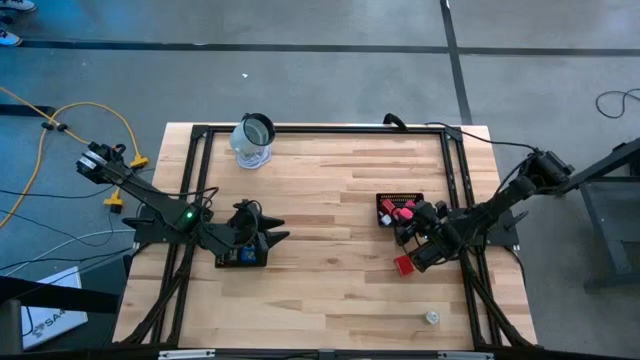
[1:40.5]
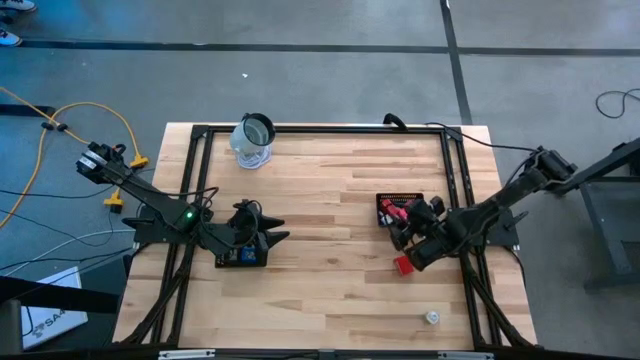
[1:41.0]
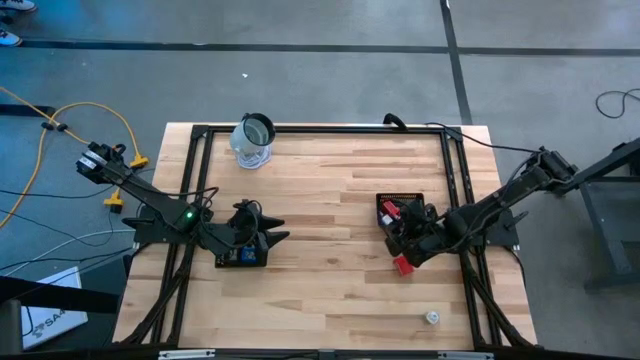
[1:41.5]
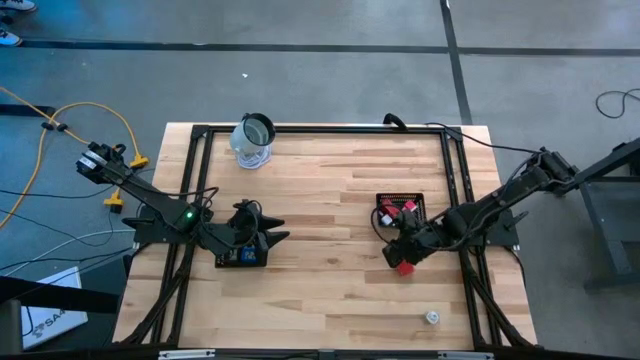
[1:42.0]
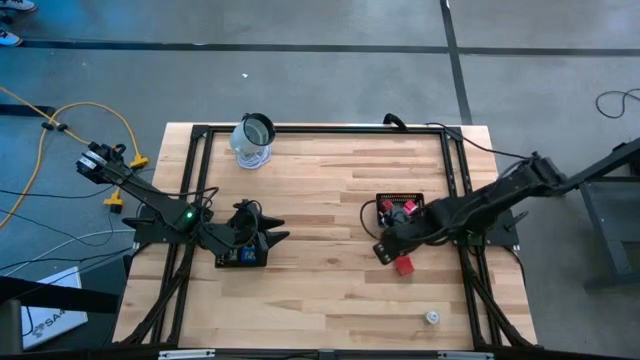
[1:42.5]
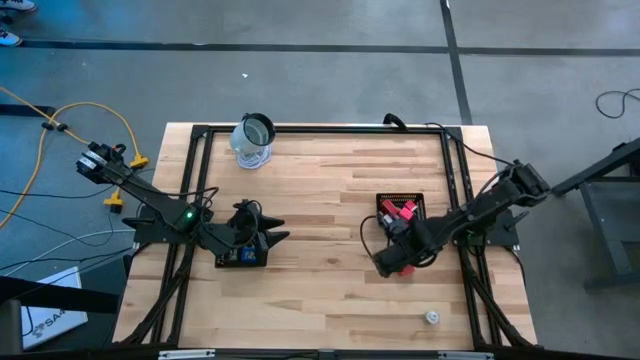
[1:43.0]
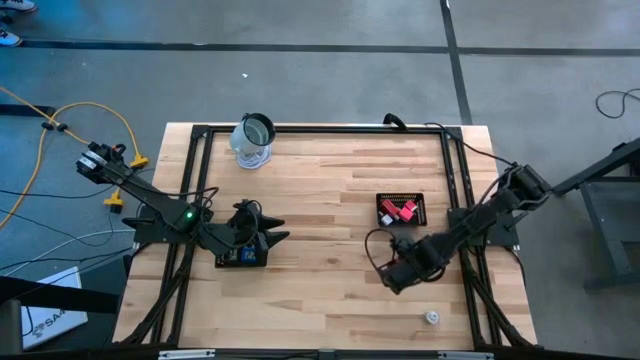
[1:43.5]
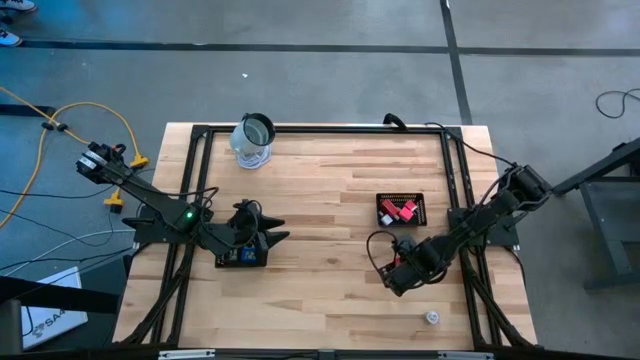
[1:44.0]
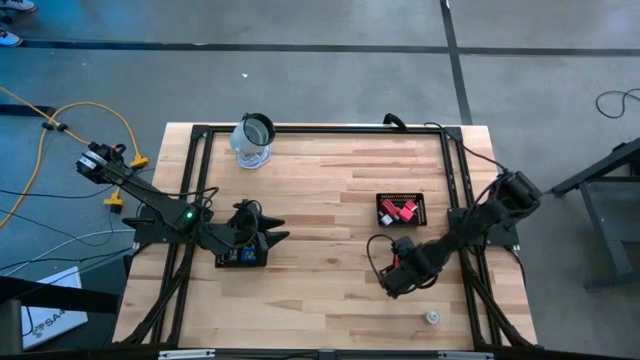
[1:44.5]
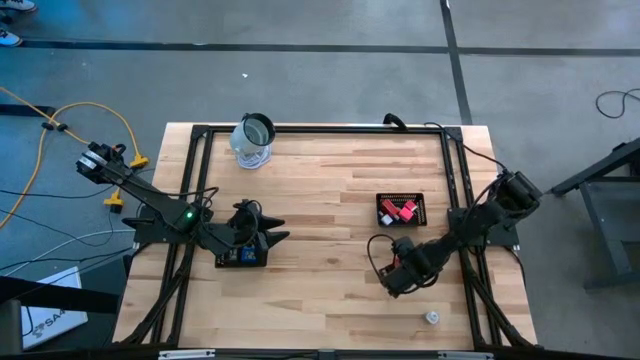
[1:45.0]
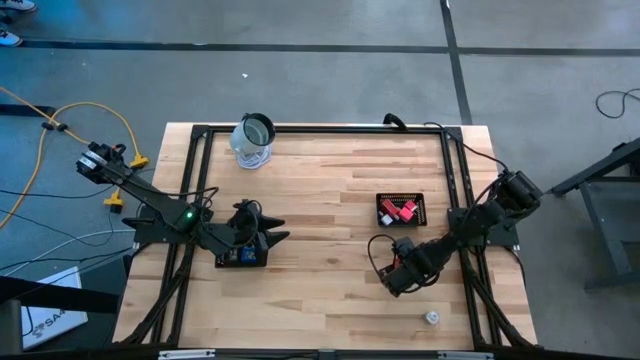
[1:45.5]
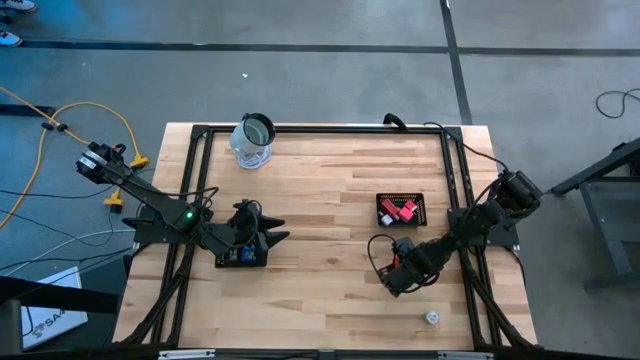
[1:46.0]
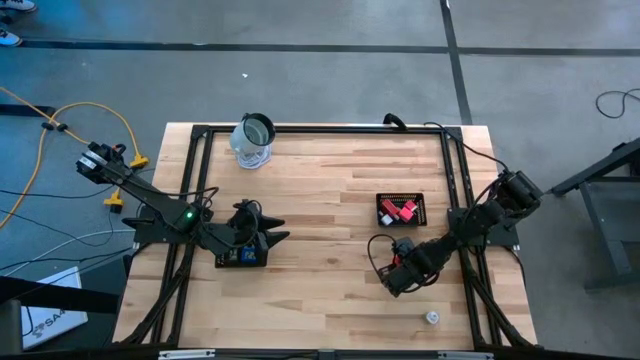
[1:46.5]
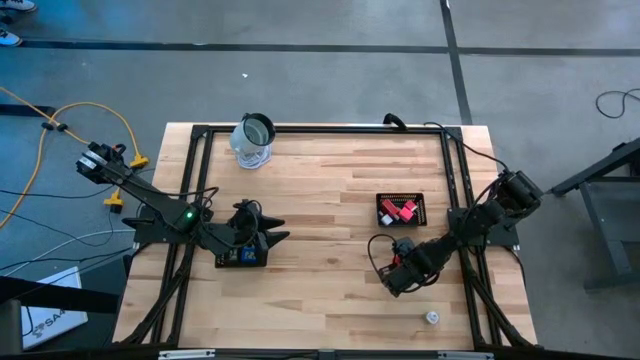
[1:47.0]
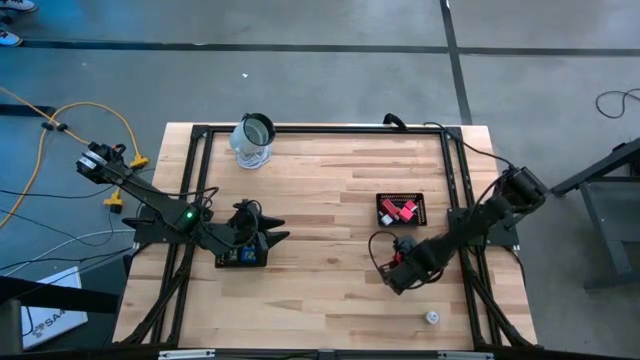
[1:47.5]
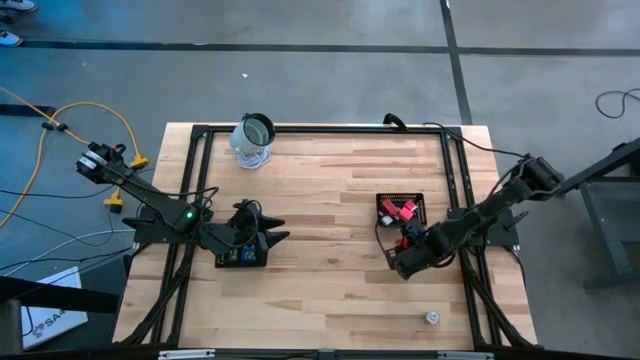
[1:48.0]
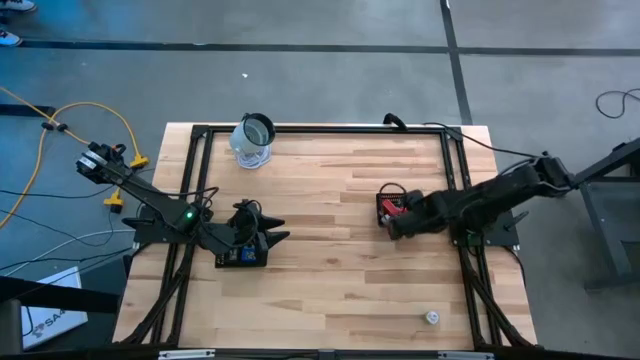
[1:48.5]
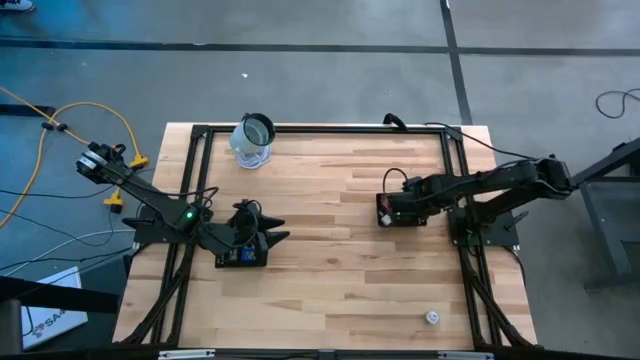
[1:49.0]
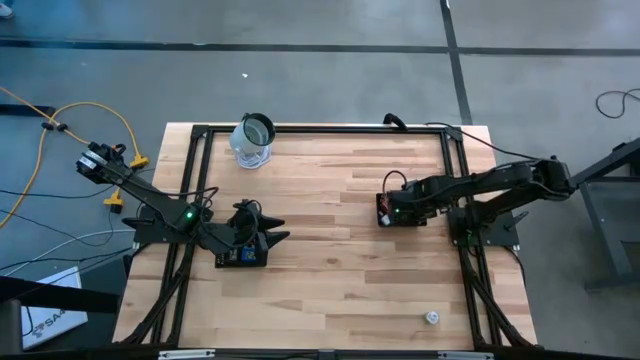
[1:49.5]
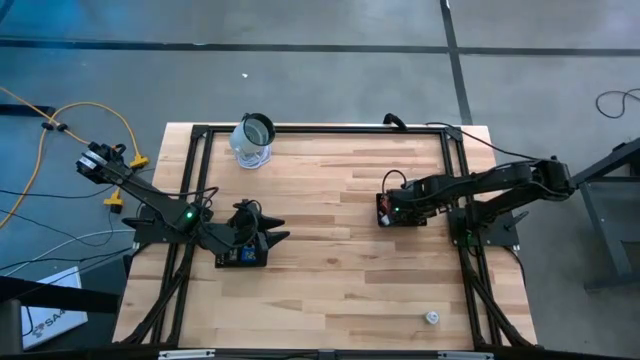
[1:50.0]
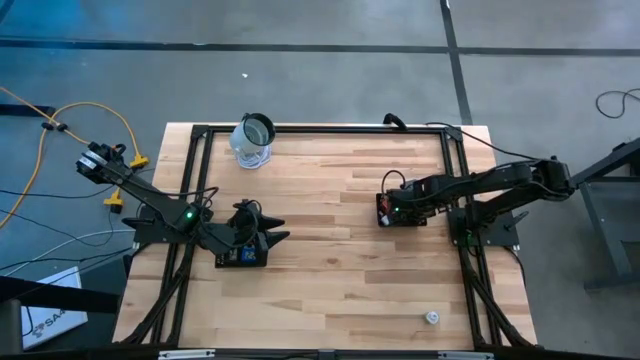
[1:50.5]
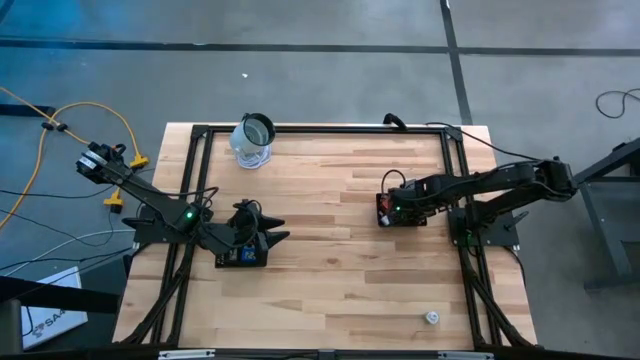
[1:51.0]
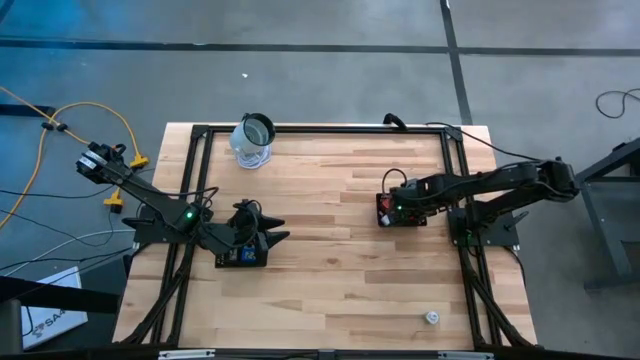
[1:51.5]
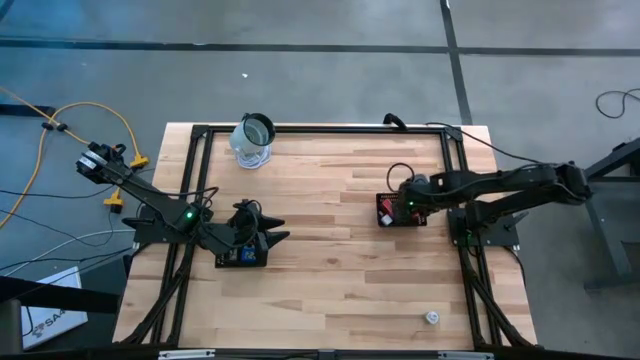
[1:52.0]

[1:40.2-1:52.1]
Task: Pick & Place Office items
Put the red charger adapter into the right black bin

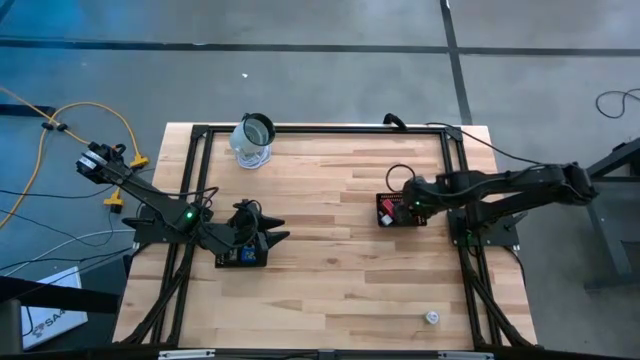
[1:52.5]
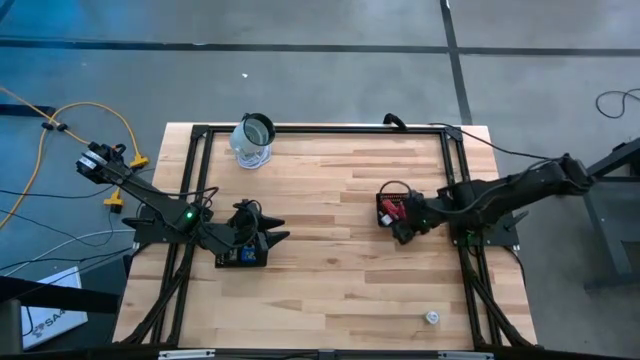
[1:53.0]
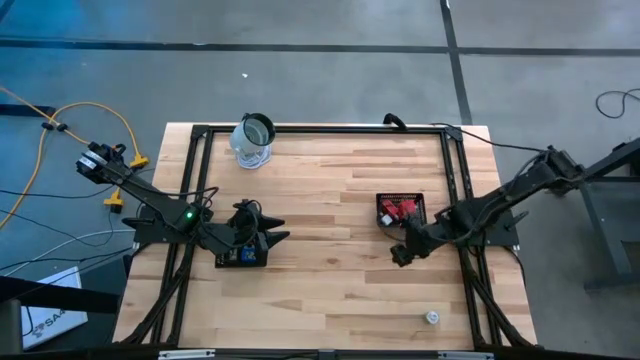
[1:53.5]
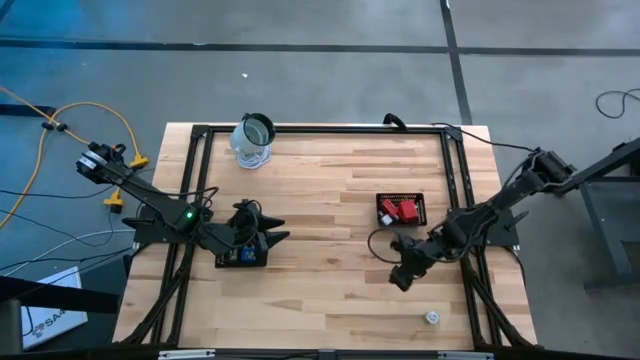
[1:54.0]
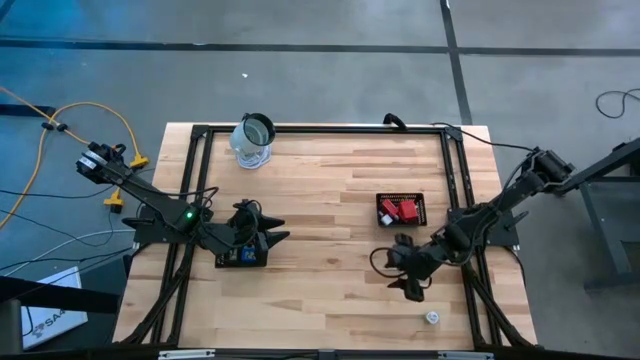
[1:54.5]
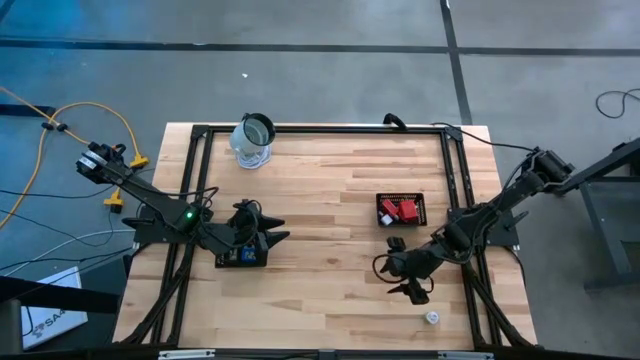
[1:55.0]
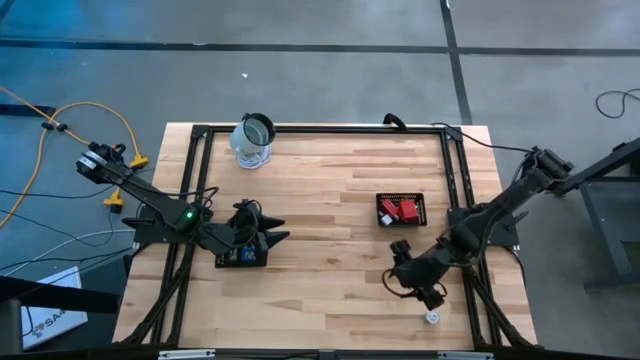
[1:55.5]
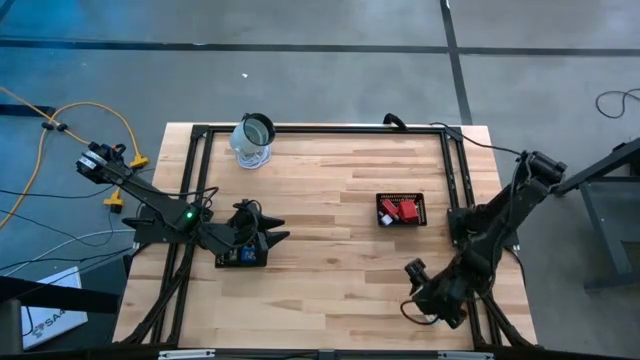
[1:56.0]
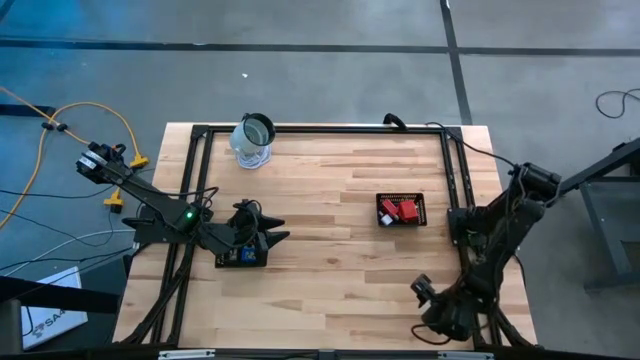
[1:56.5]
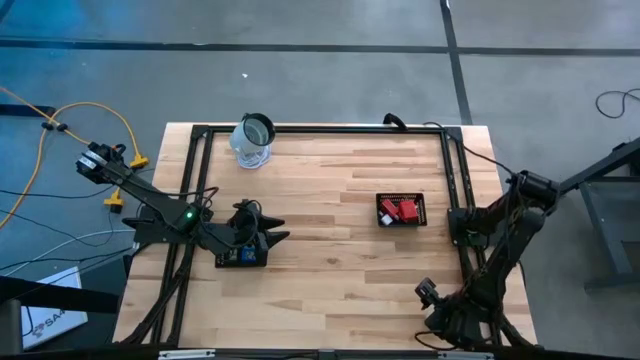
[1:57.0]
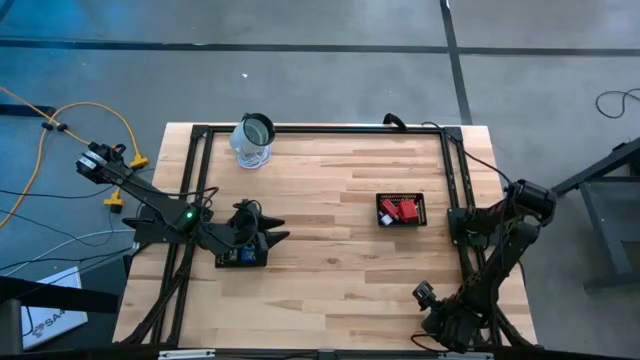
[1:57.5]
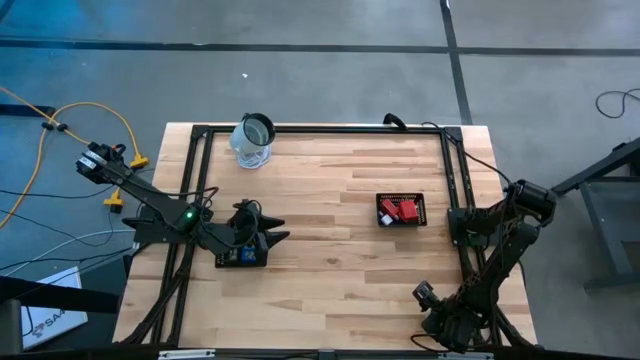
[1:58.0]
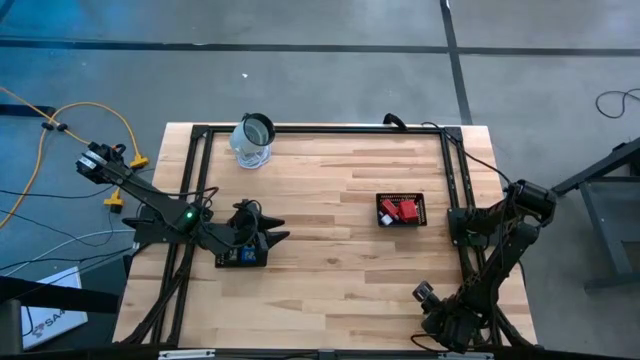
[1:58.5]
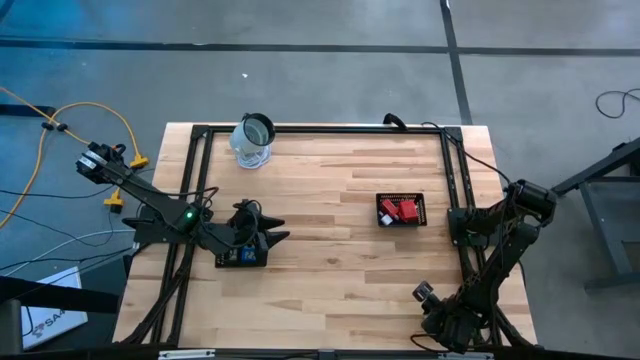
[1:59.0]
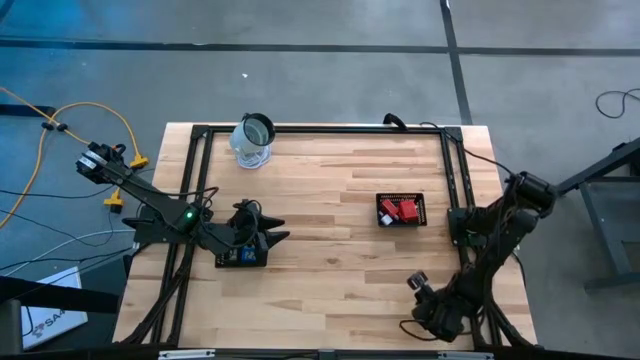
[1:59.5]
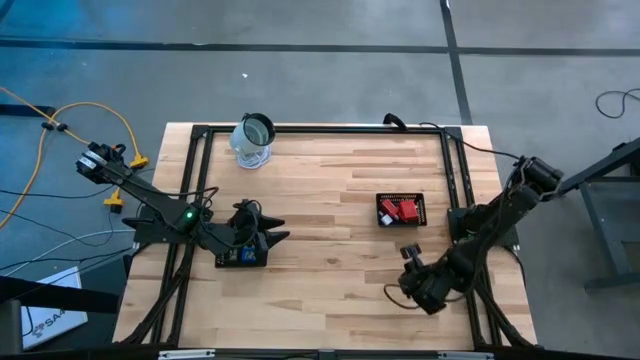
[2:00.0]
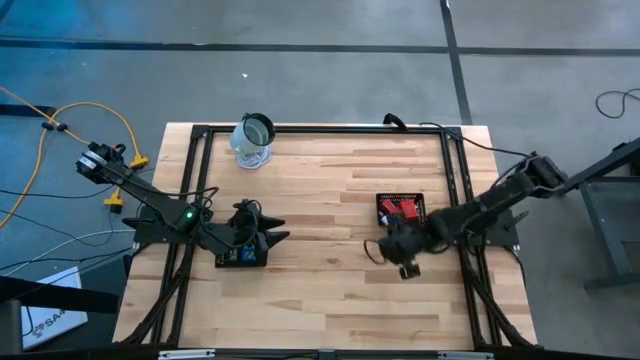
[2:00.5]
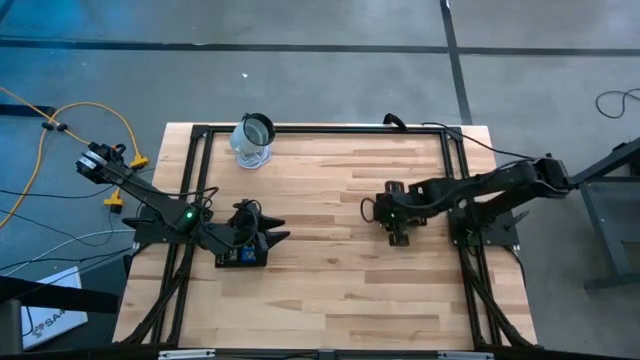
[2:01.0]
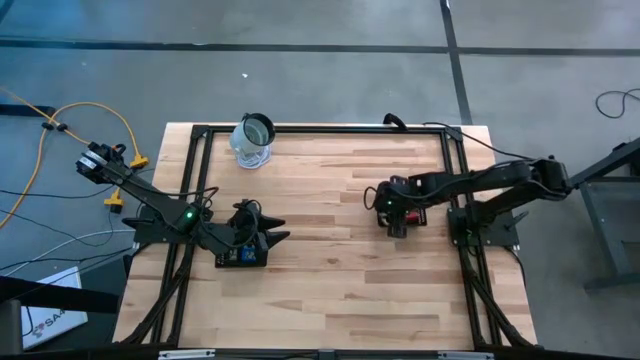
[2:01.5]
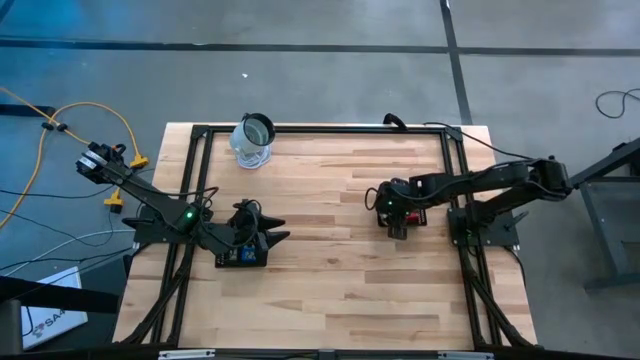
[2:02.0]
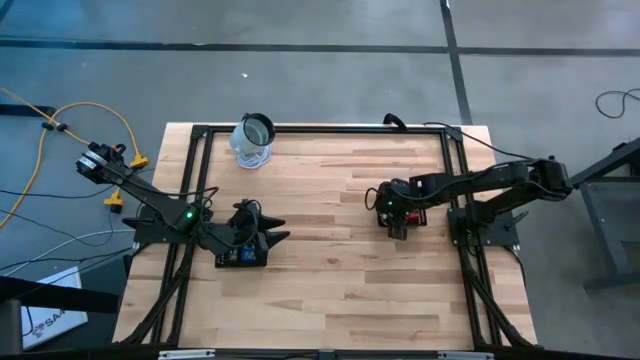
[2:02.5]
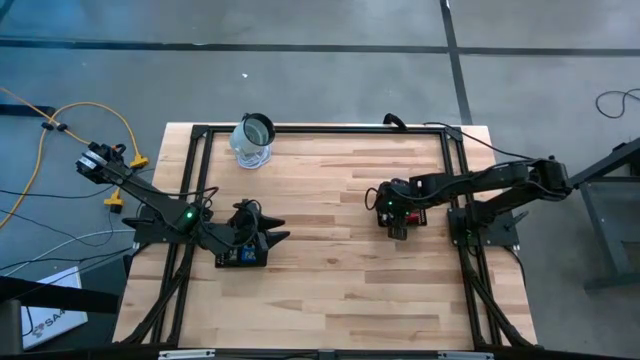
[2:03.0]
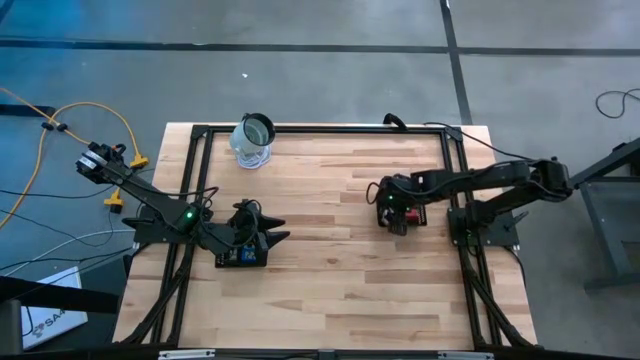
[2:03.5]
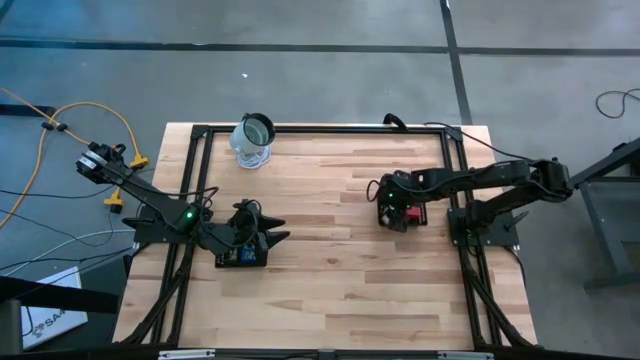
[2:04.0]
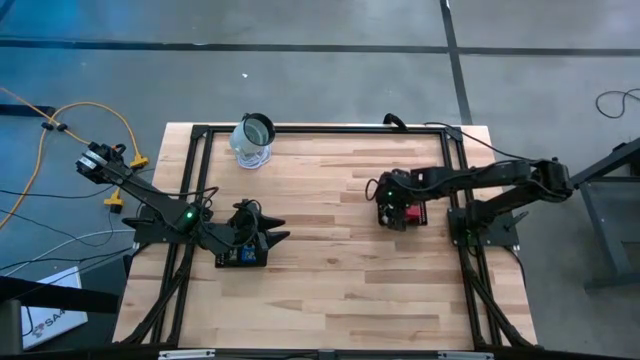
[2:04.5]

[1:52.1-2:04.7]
Put the green charger adapter into the right black bin
